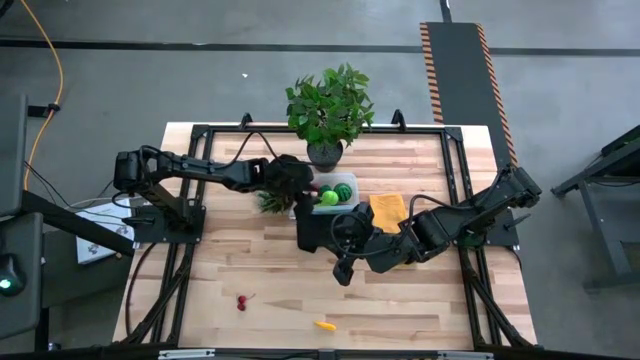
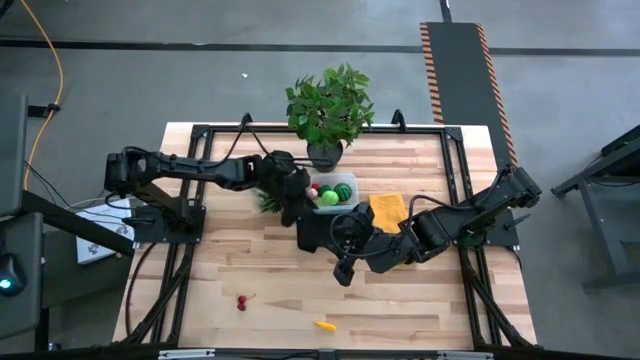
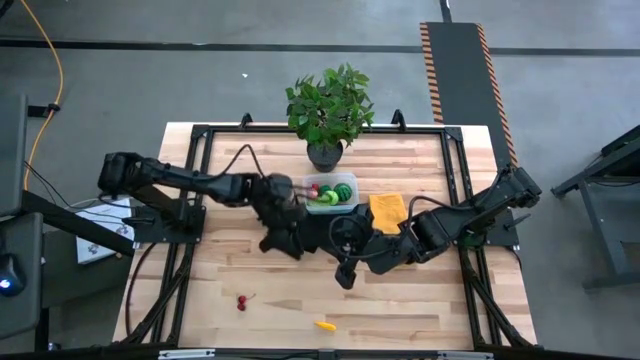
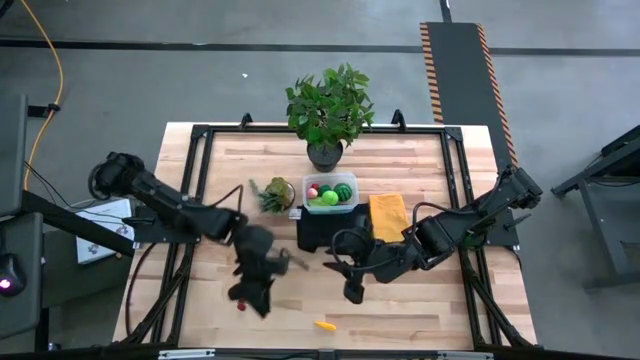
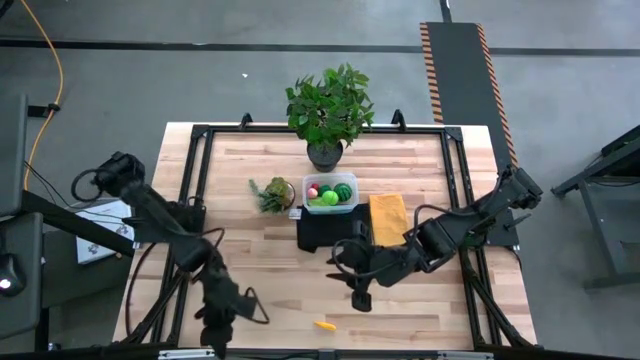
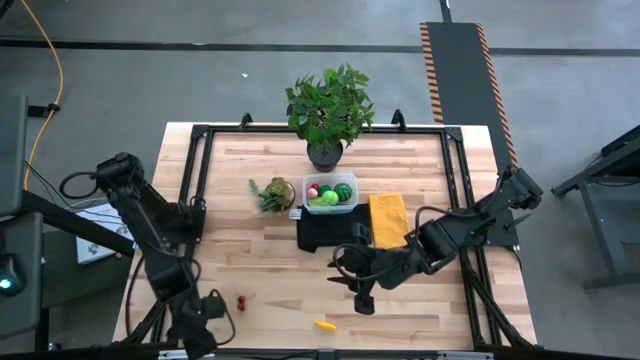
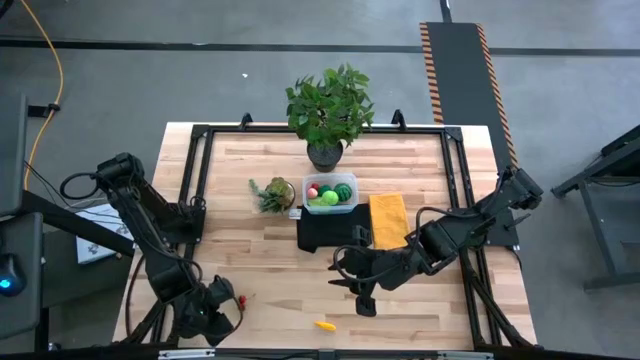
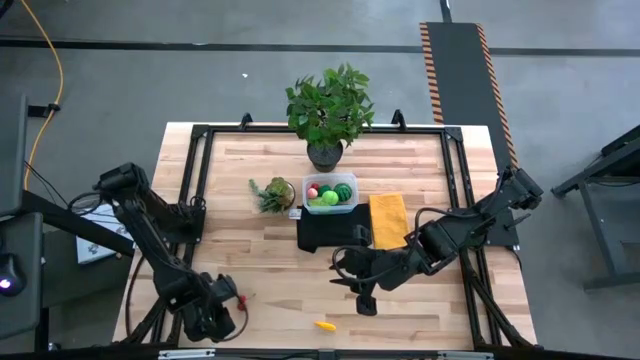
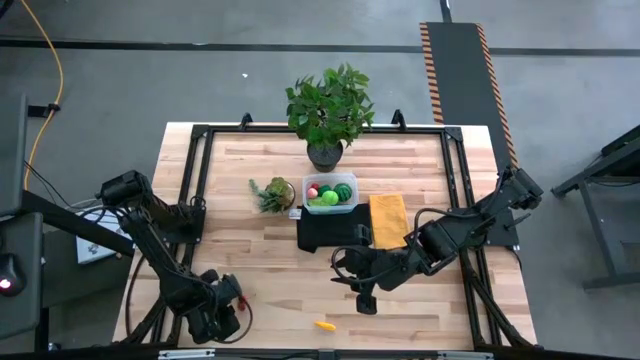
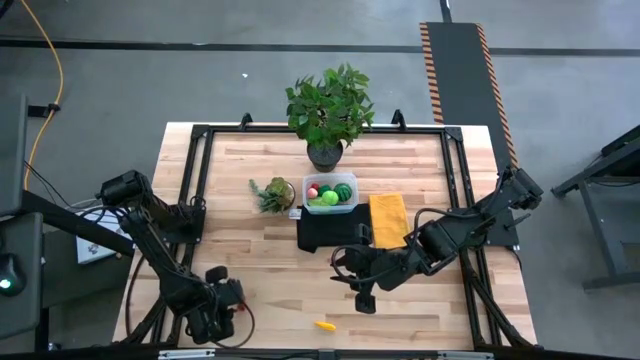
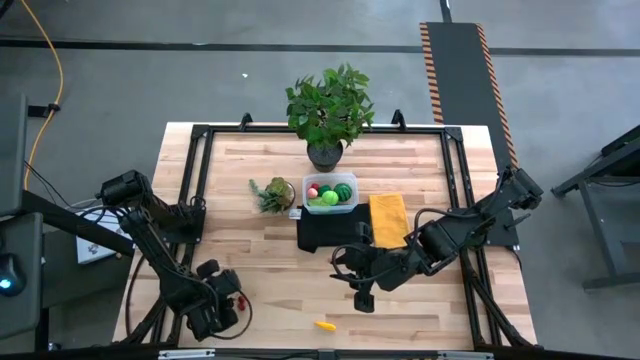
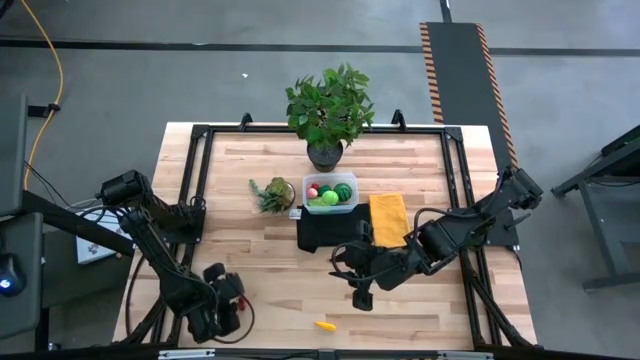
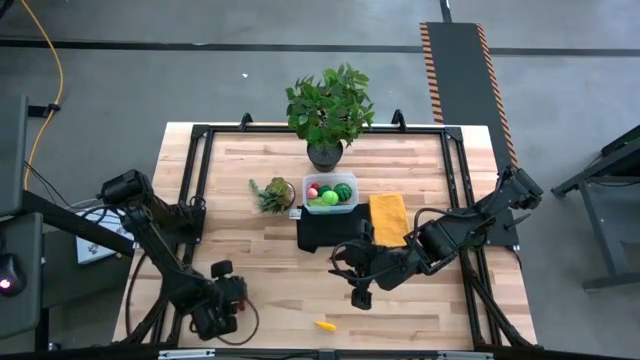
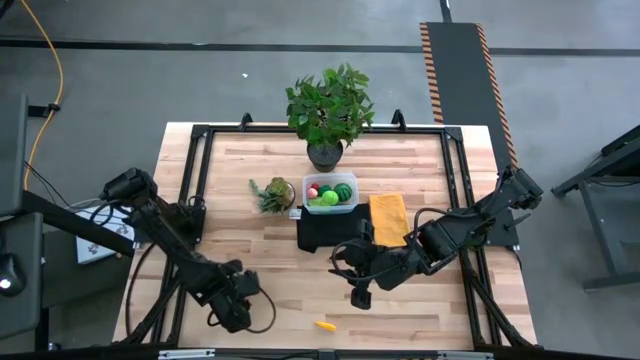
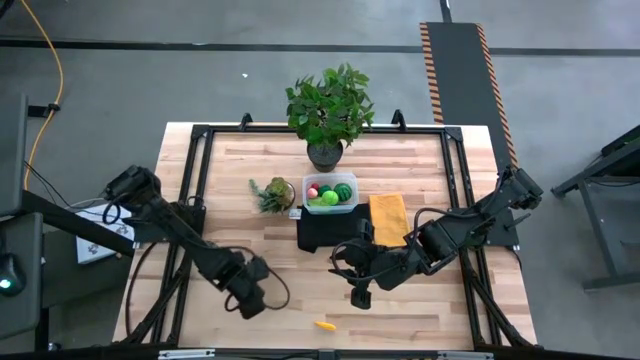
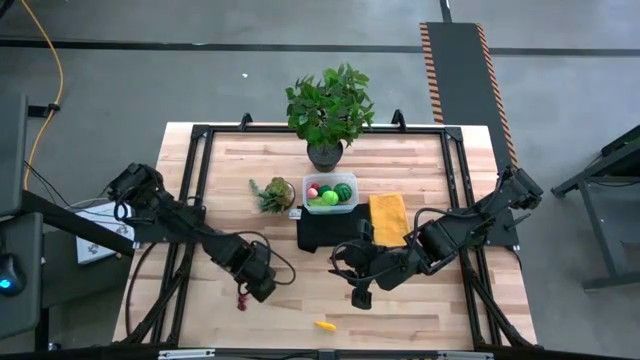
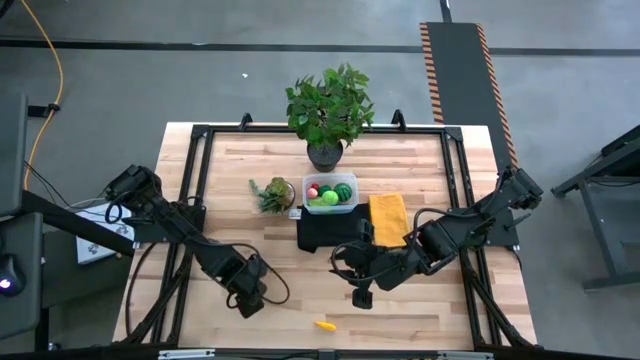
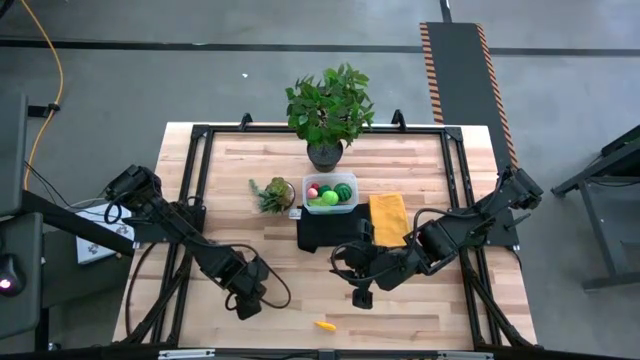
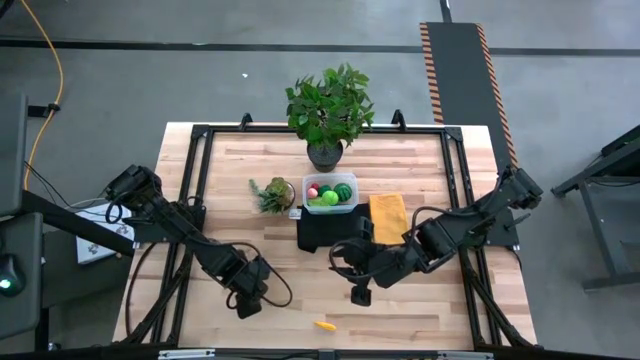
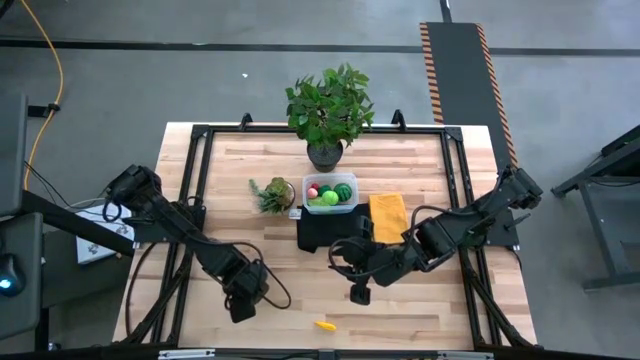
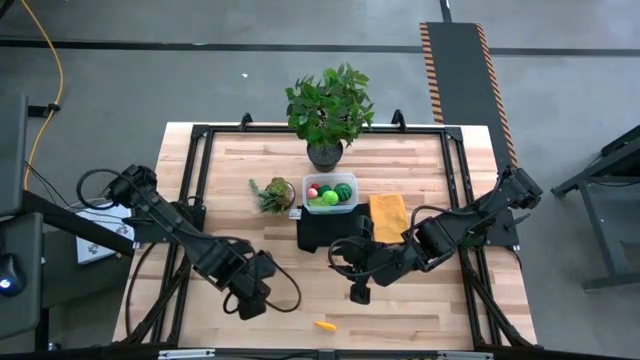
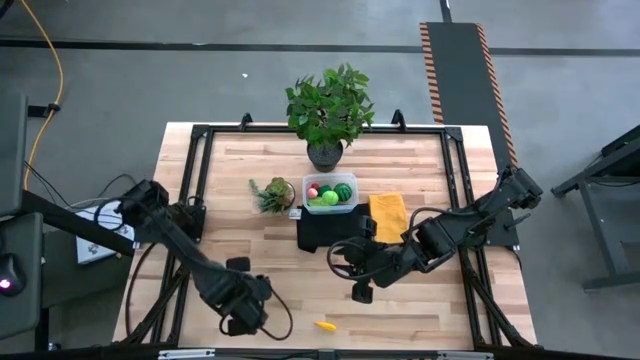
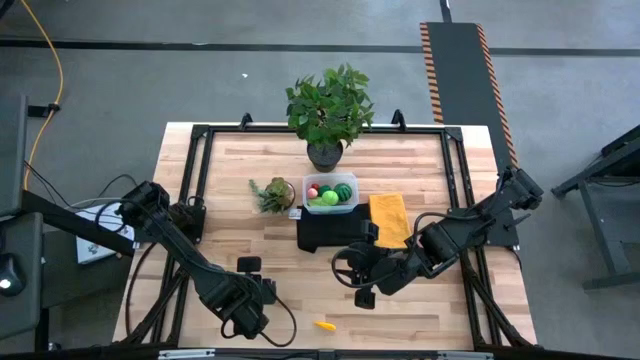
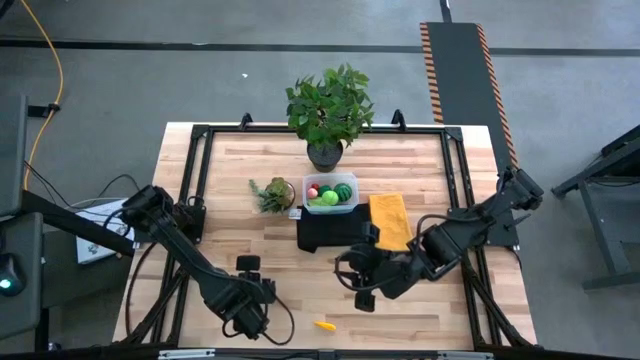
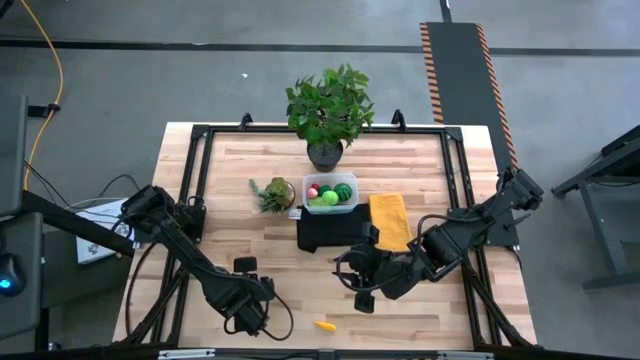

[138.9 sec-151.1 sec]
Task: Pick and placing Produce into tupperware
Put the top dark red cherry into the transparent bin

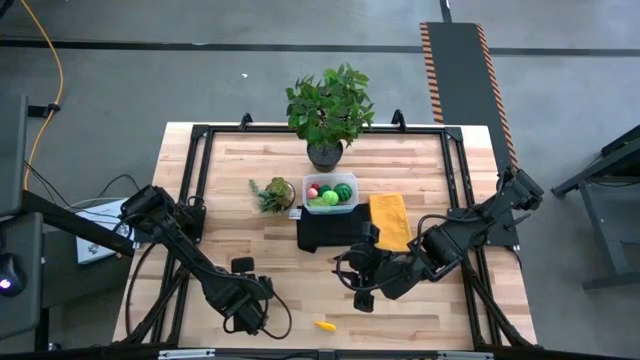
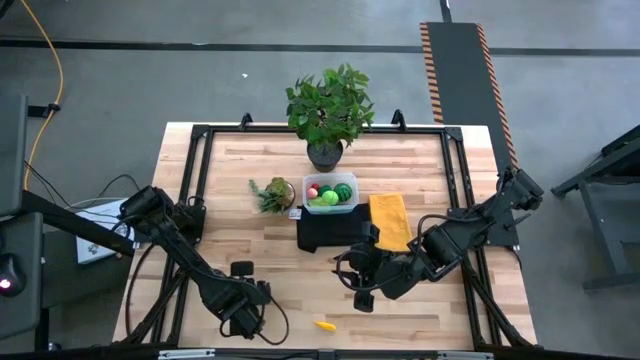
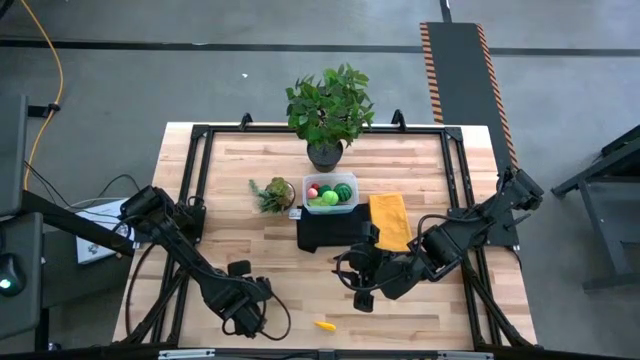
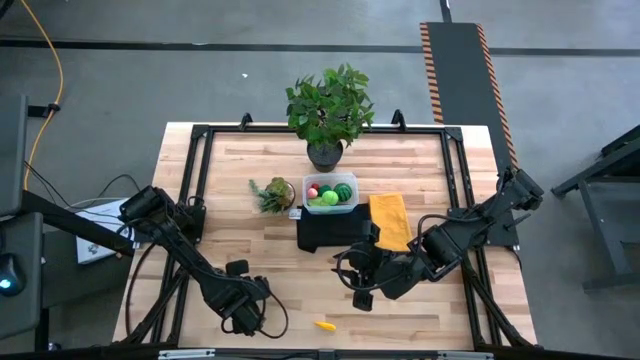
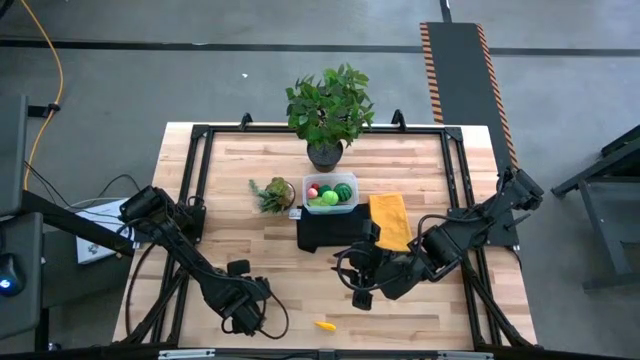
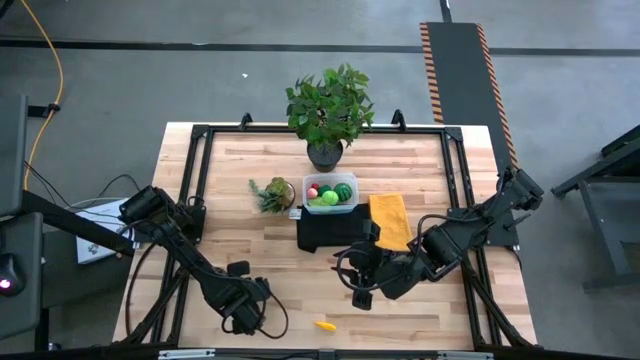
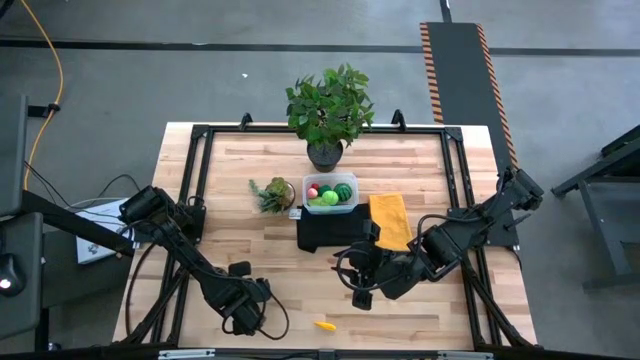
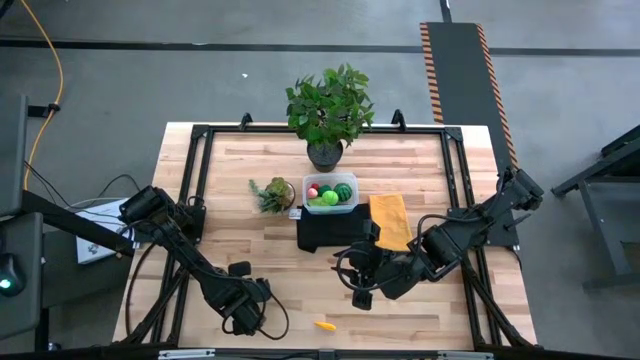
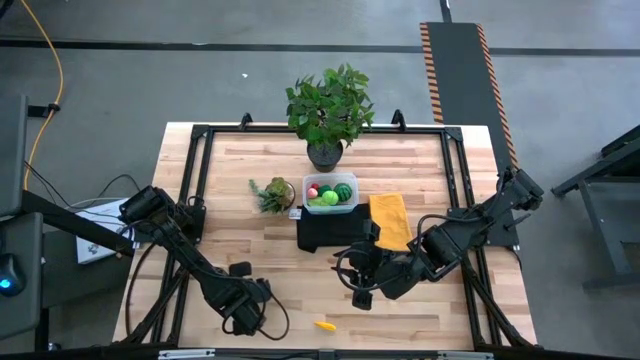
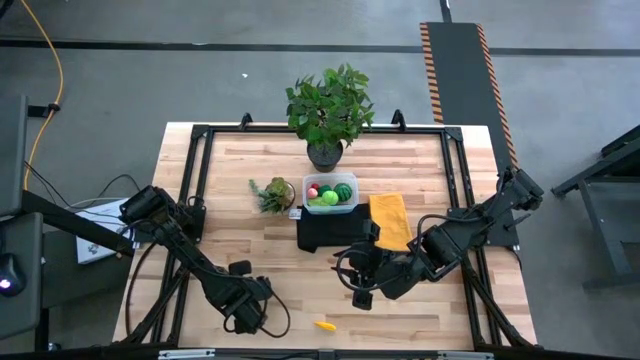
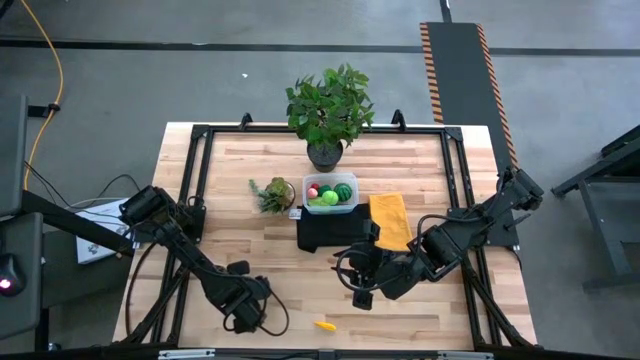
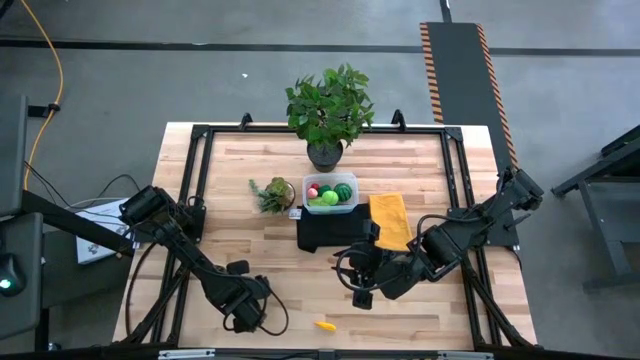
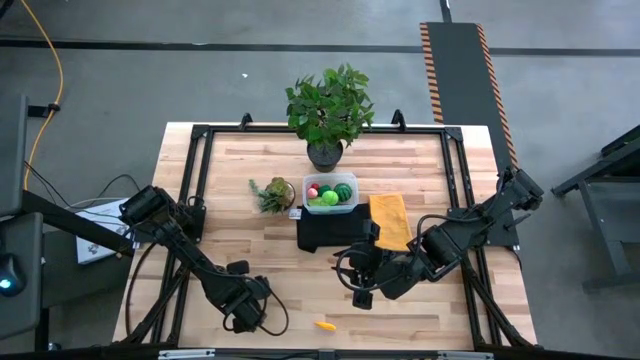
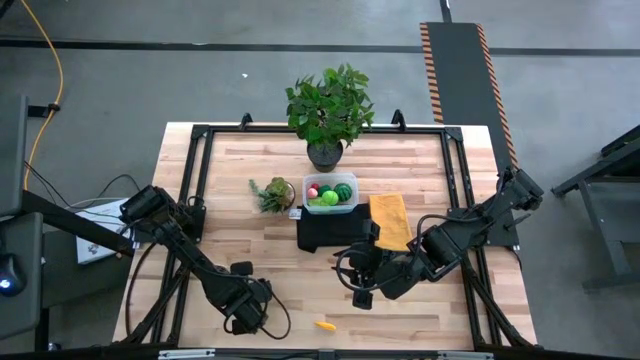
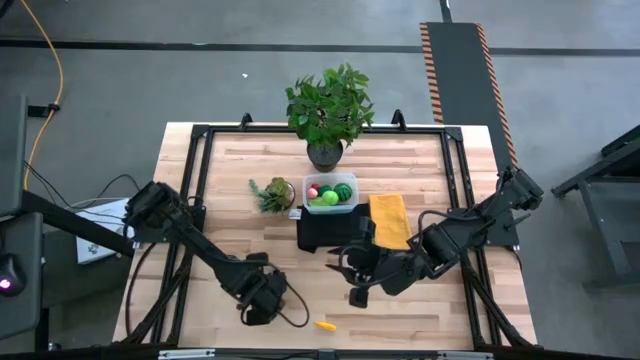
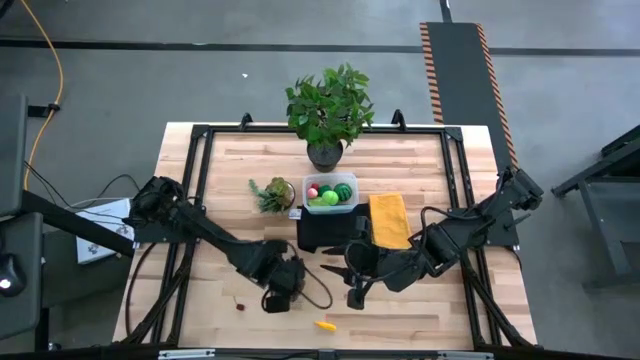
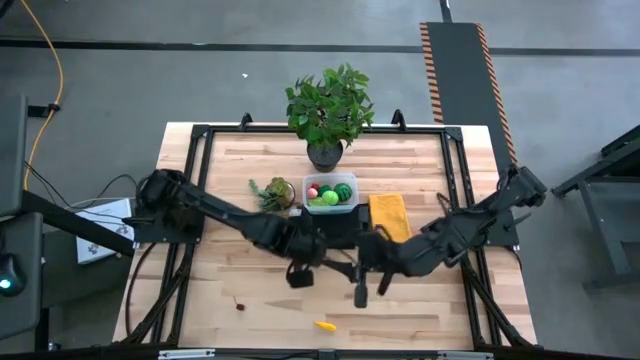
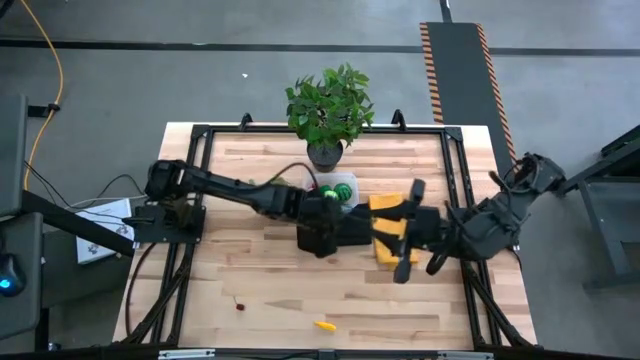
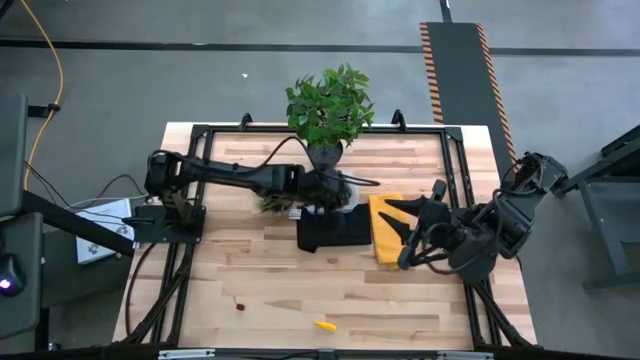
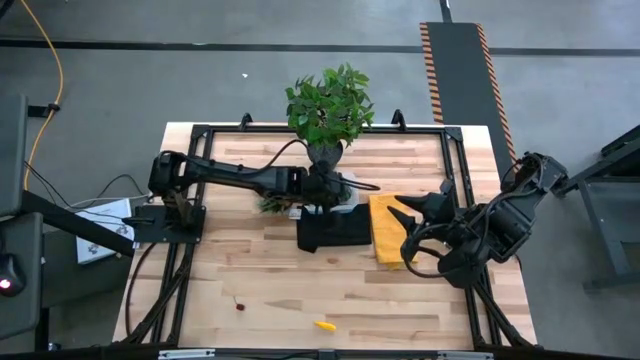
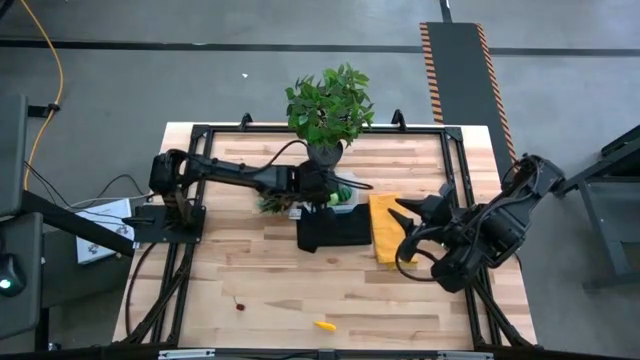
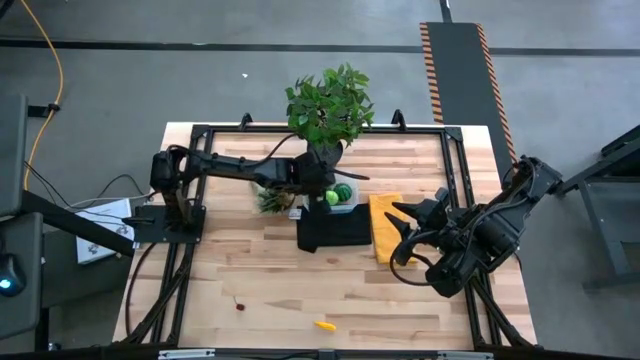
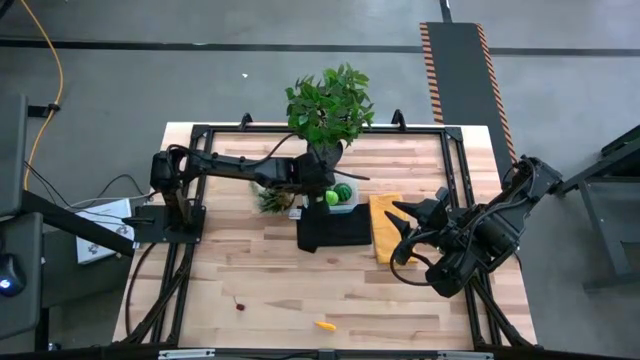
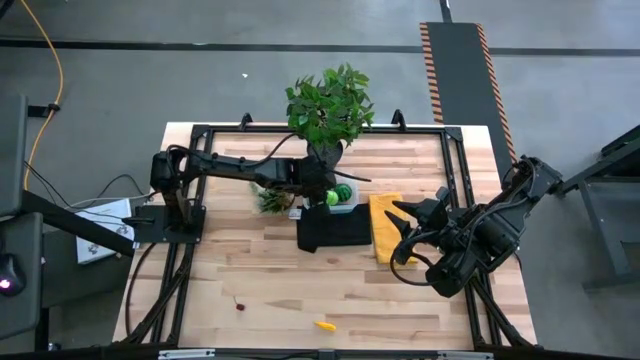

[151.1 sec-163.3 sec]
Put the top dark red cherry into the transparent bin
